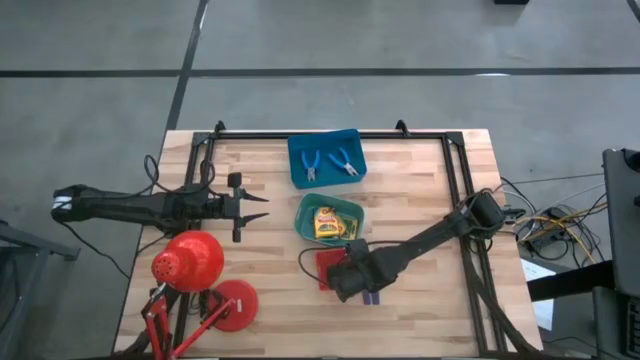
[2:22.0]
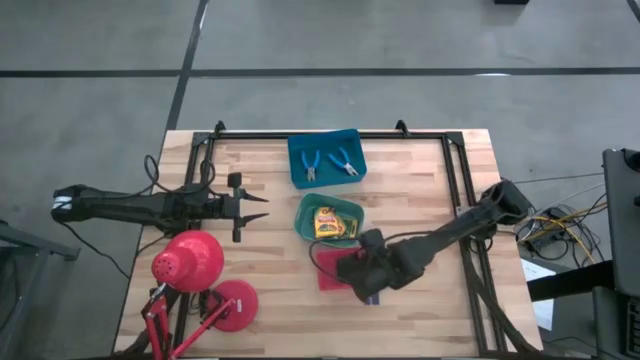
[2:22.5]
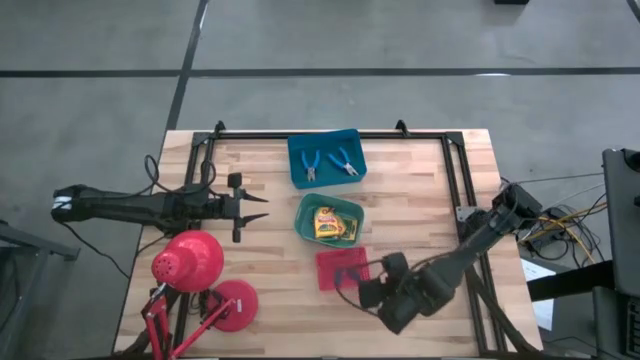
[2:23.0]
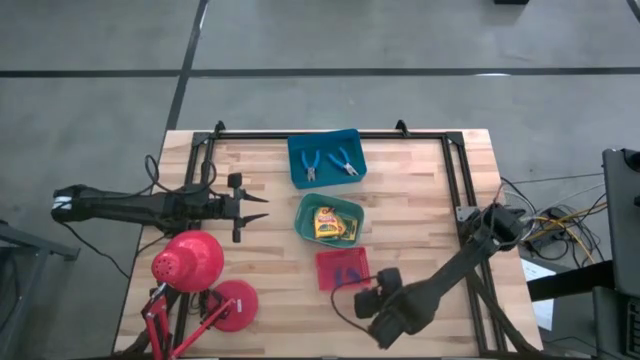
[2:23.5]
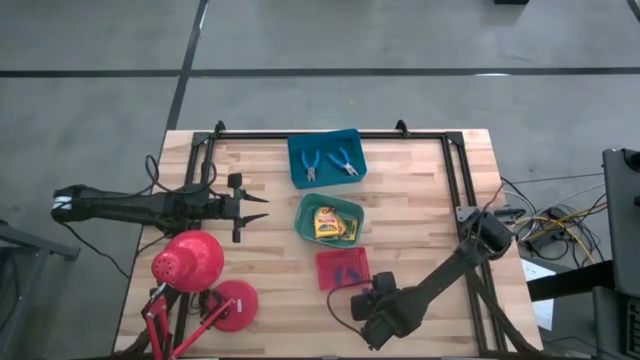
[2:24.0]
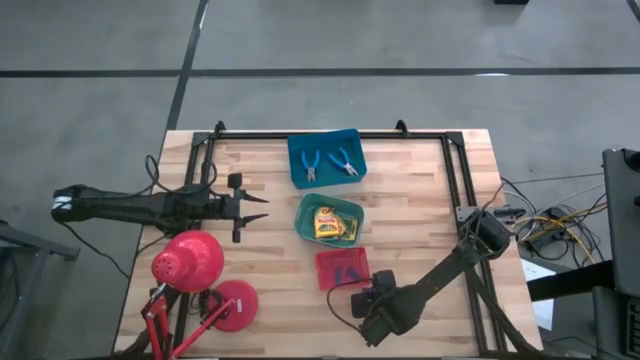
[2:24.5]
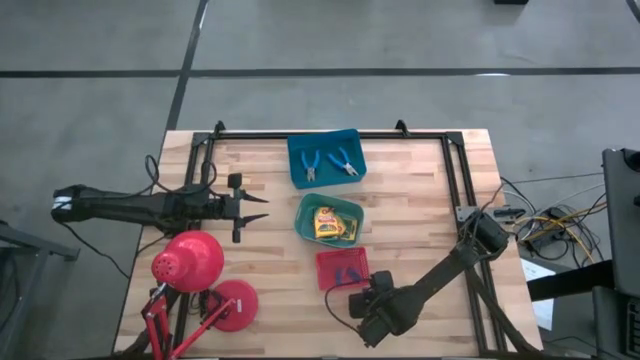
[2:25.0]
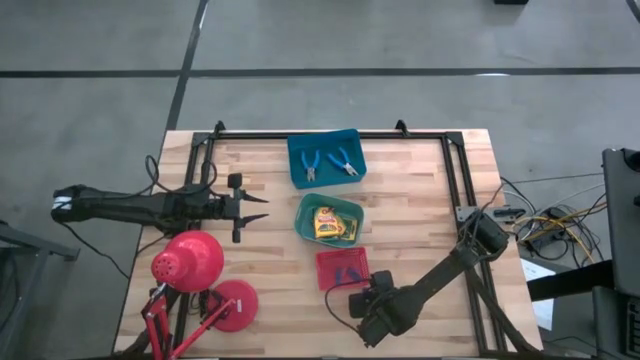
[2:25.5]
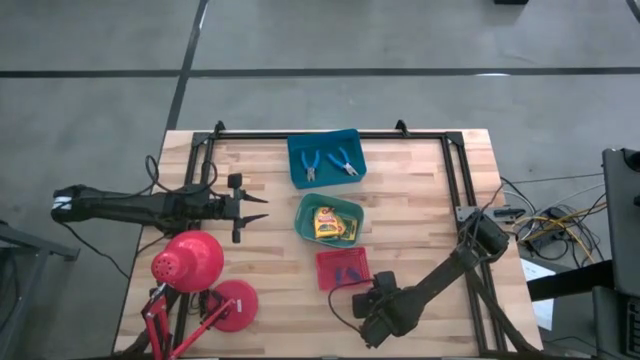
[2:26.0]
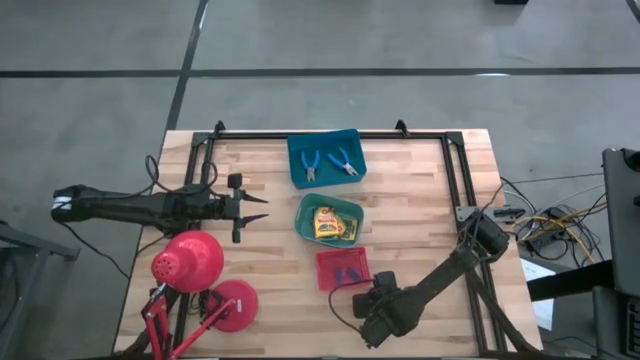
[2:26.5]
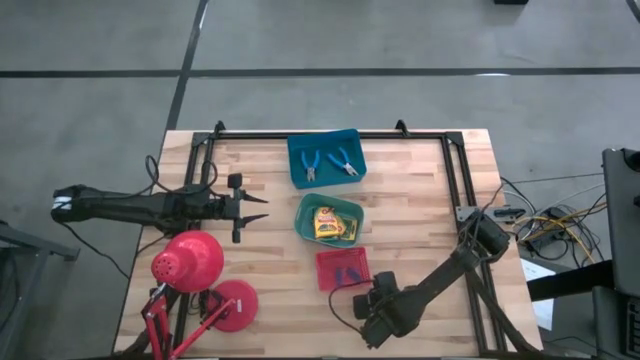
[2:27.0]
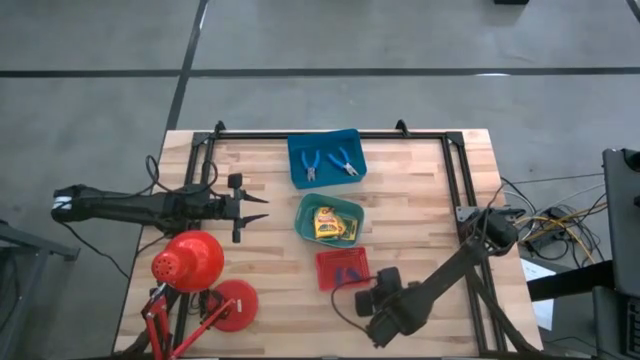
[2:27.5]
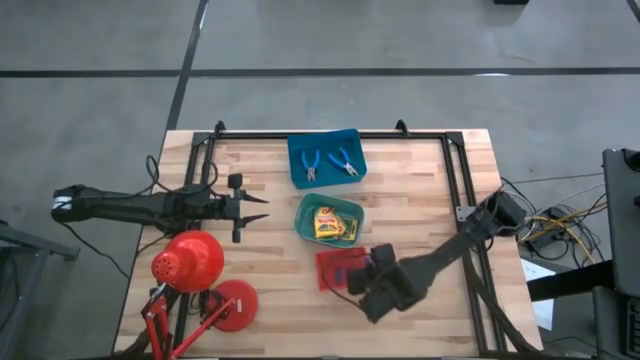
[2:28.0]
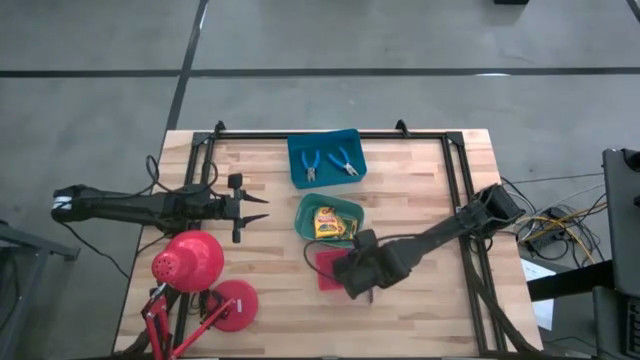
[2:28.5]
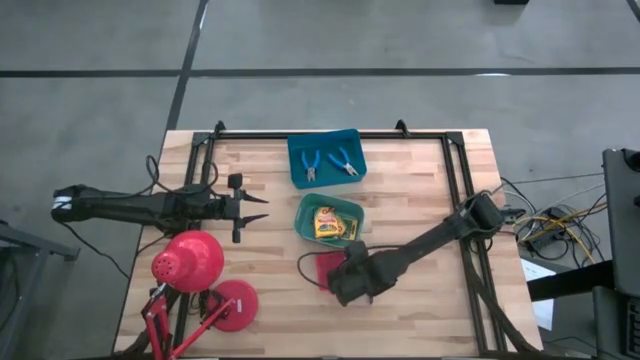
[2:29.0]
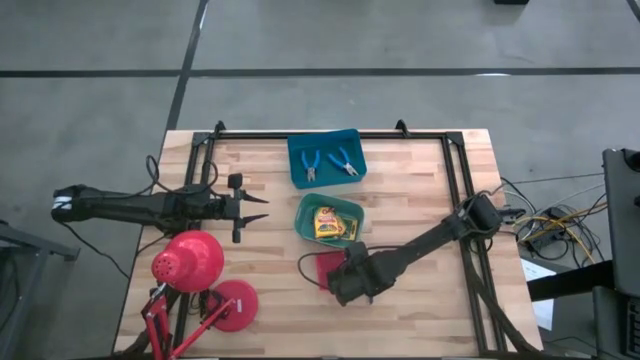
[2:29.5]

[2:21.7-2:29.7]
Task: Pick & Place School Supplies
Put the violet eraser in the red bin

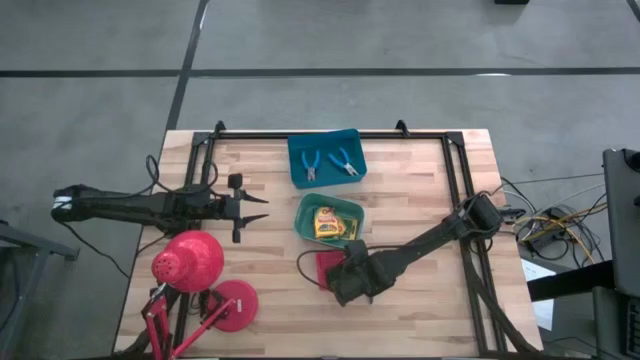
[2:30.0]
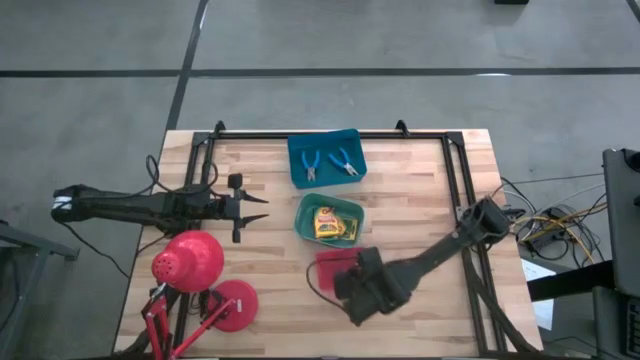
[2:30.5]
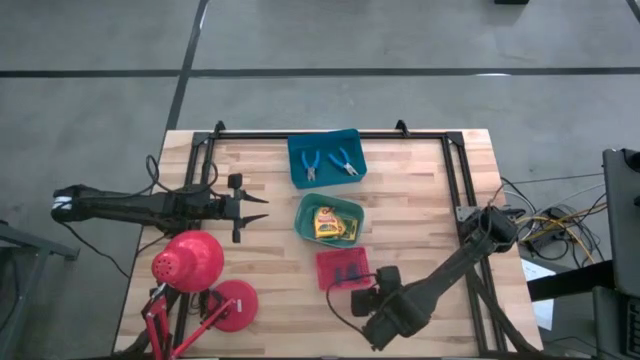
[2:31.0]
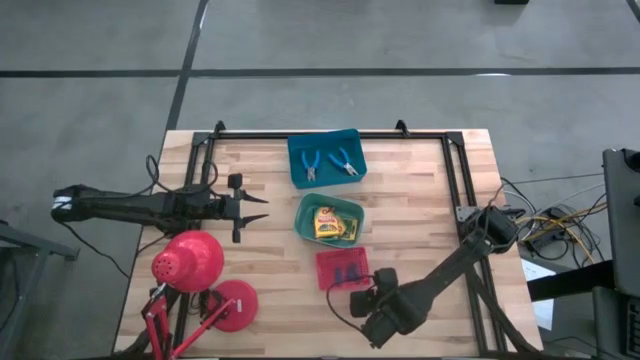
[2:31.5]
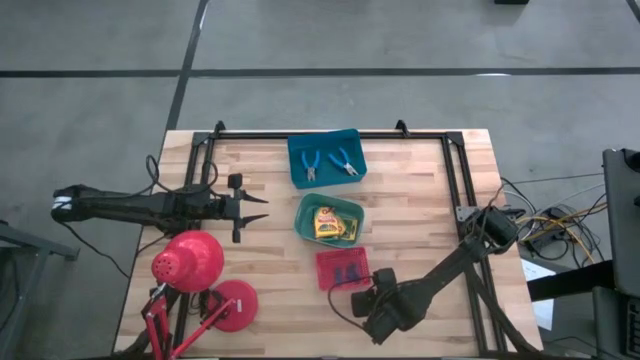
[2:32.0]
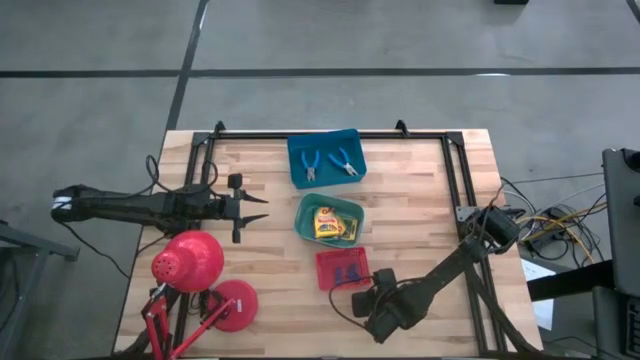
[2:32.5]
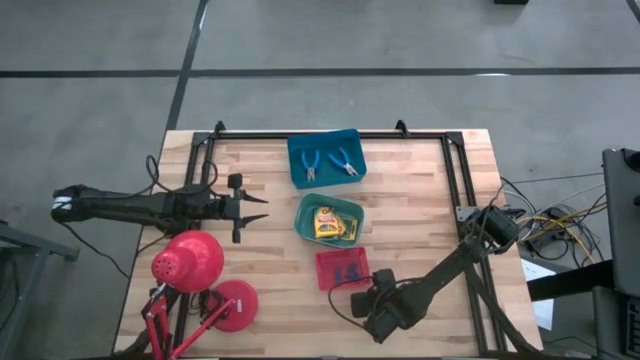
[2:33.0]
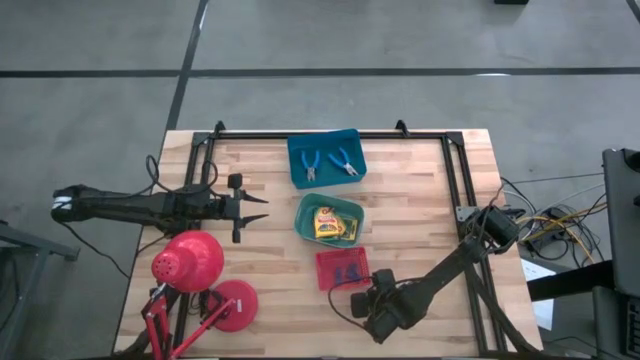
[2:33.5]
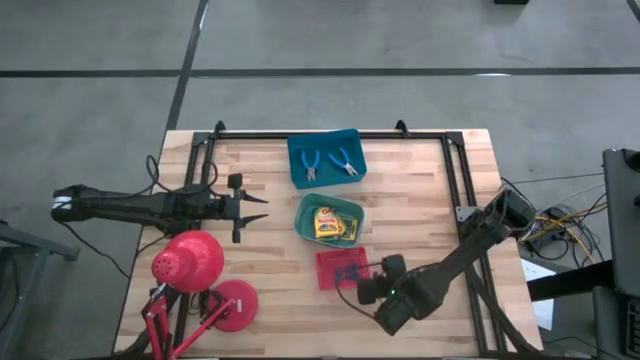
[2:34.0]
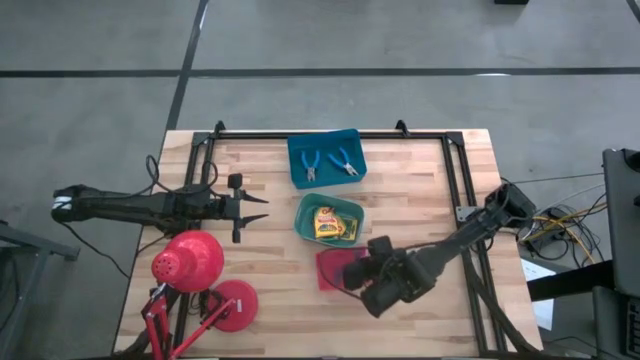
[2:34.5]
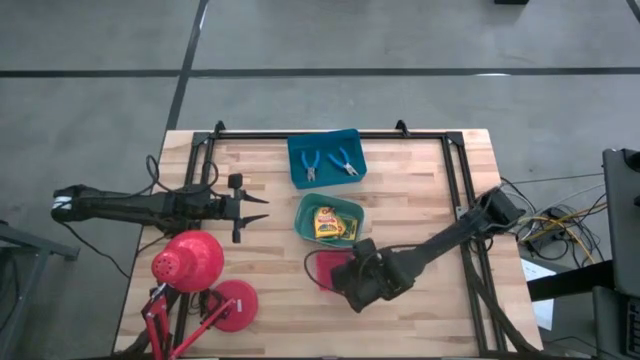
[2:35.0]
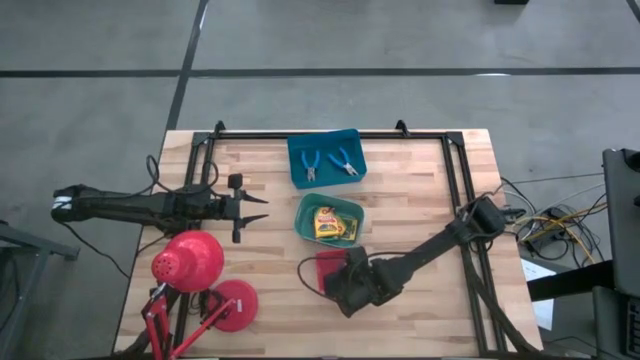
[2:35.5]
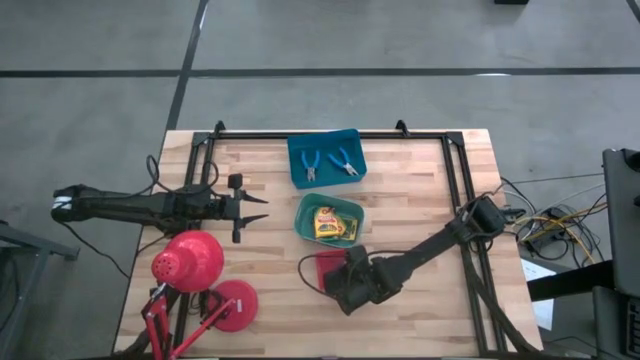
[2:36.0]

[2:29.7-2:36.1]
Put the violet eraser in the red bin

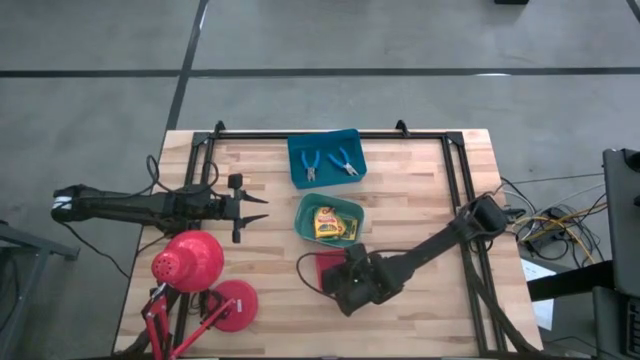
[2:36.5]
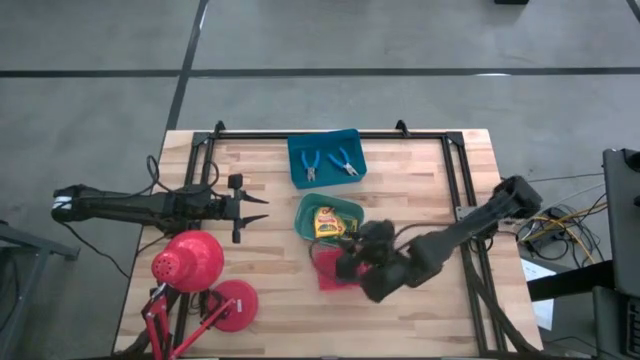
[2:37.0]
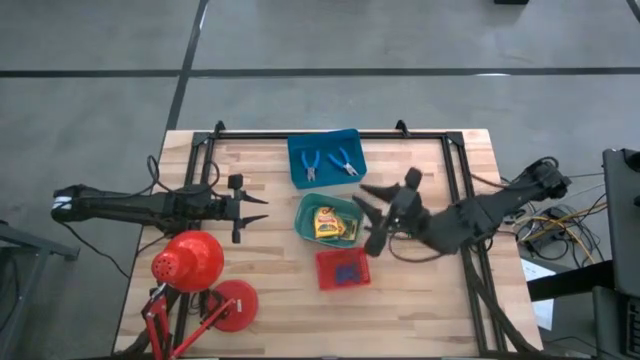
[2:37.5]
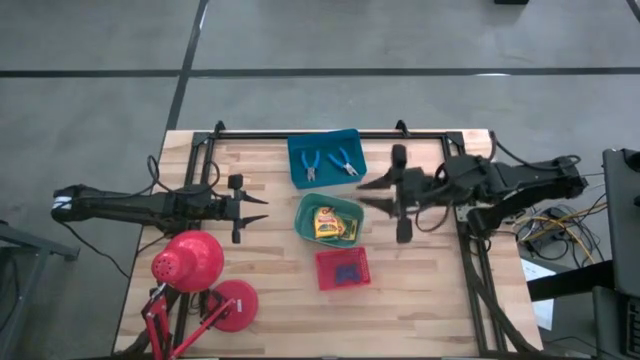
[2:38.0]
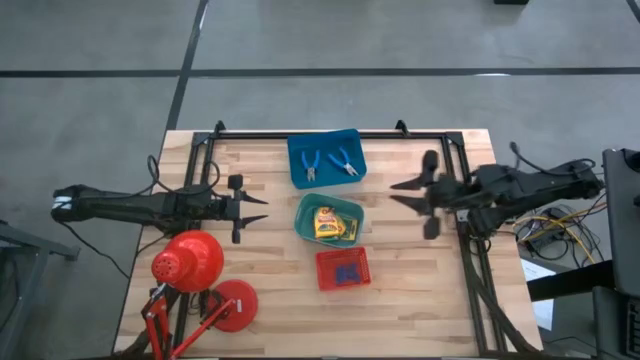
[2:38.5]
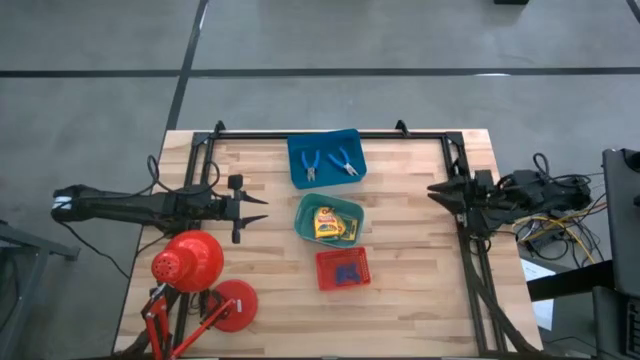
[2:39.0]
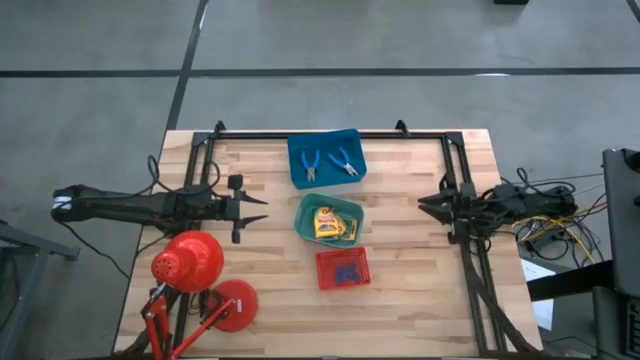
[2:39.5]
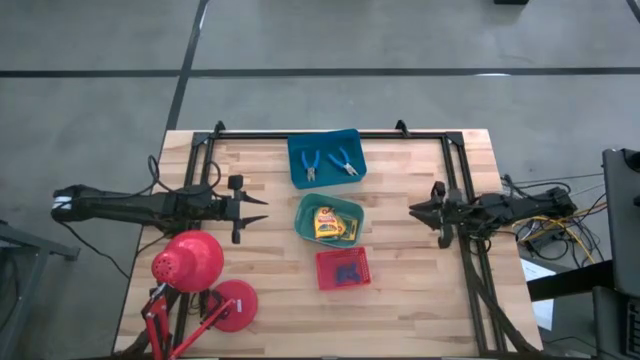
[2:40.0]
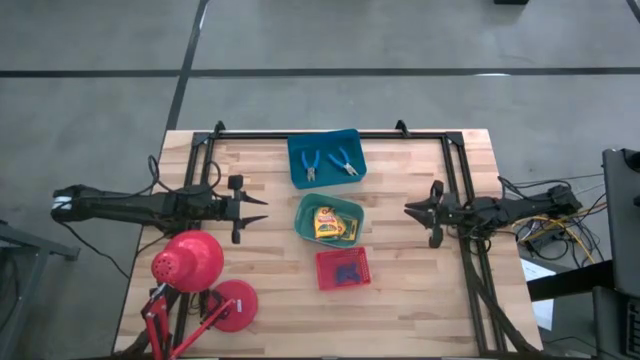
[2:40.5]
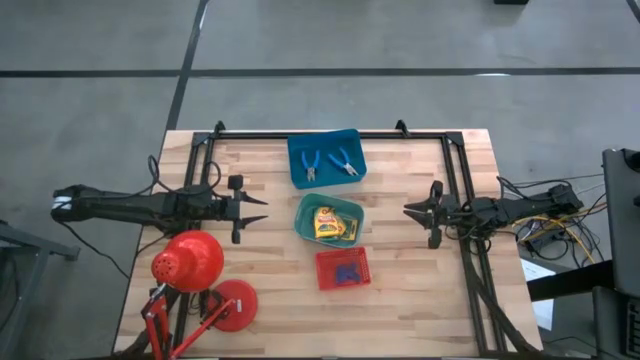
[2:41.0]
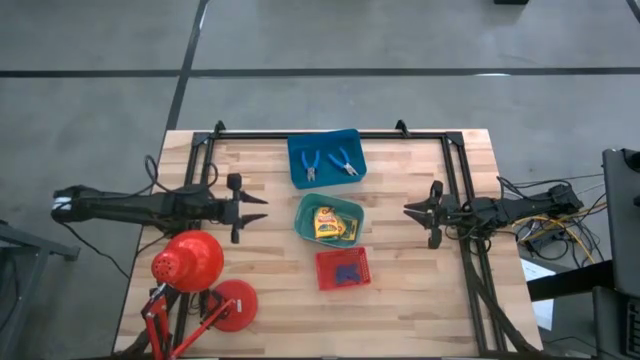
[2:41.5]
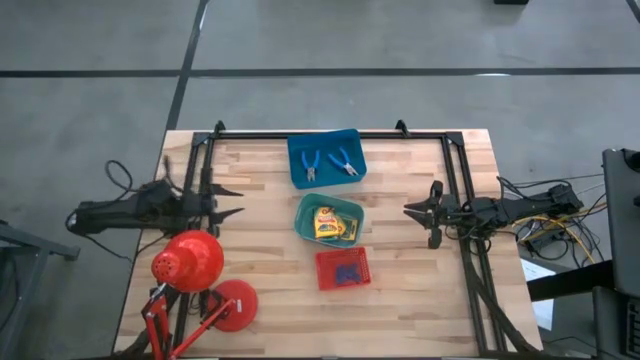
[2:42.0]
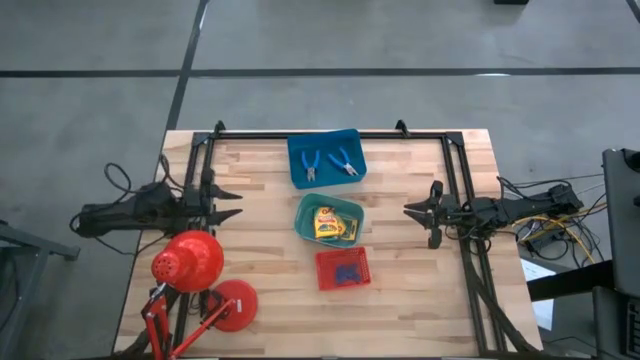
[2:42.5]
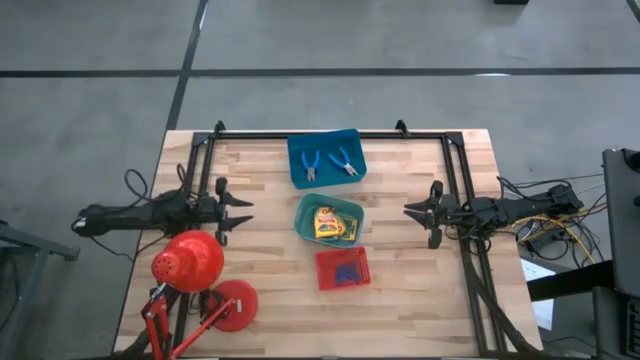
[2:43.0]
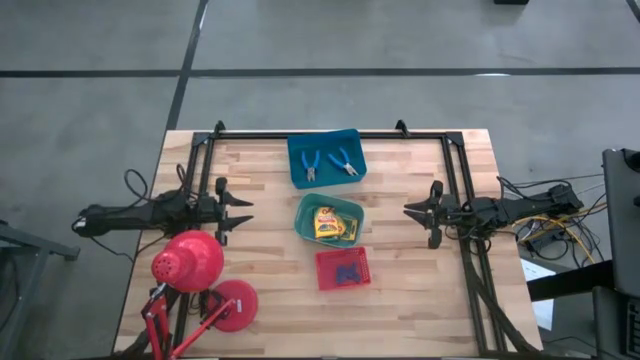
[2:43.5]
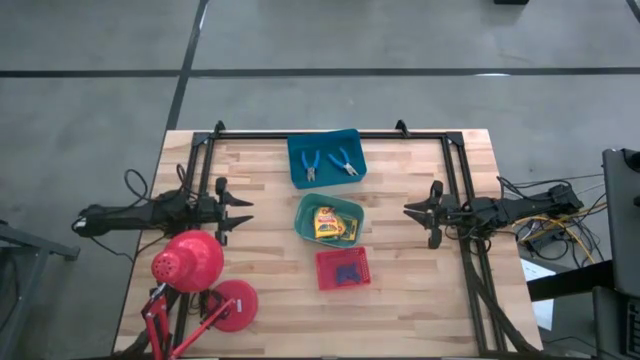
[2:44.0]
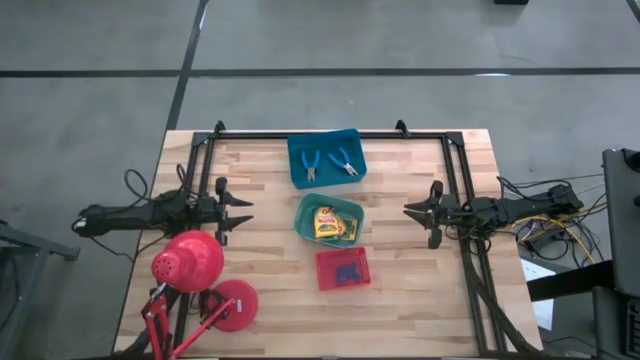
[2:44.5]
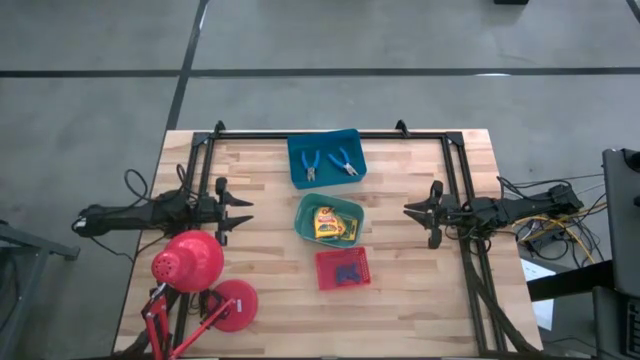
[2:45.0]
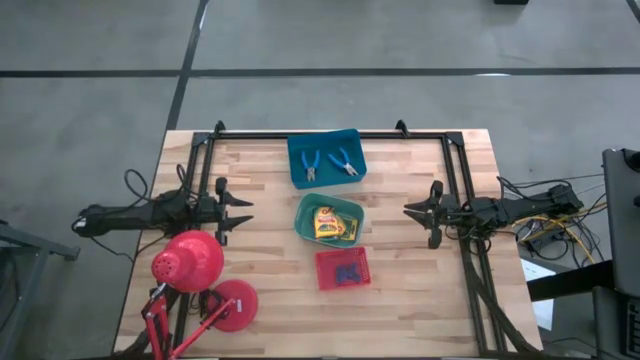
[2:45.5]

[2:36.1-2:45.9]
Return to Home Position
